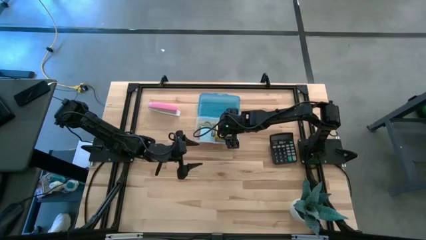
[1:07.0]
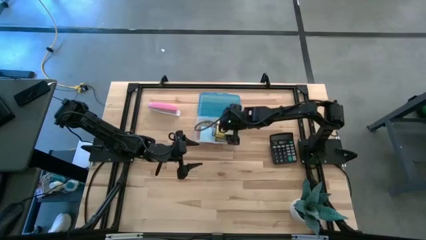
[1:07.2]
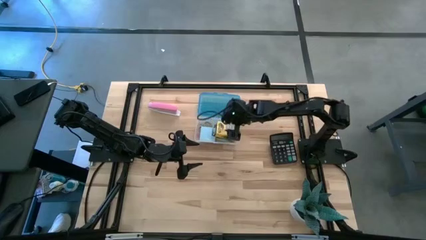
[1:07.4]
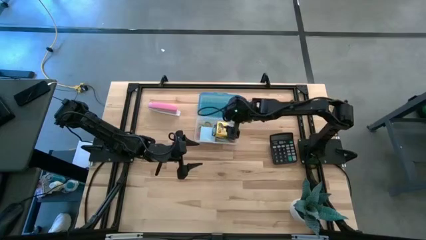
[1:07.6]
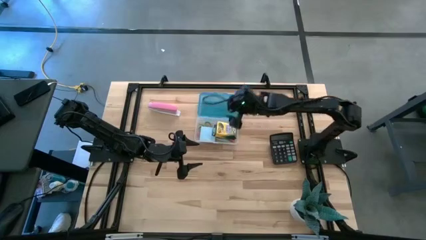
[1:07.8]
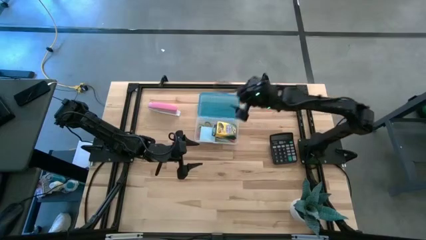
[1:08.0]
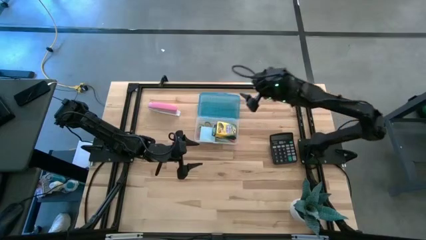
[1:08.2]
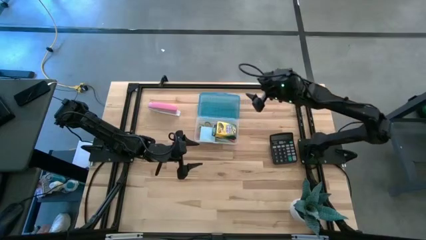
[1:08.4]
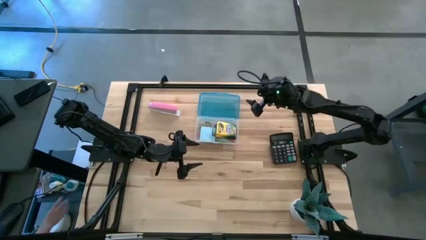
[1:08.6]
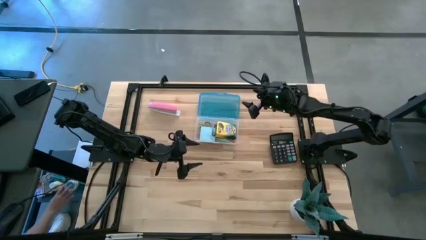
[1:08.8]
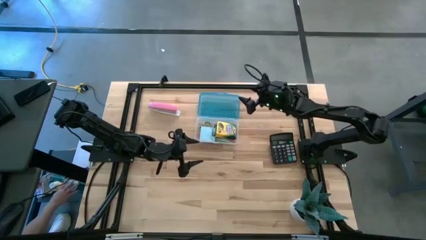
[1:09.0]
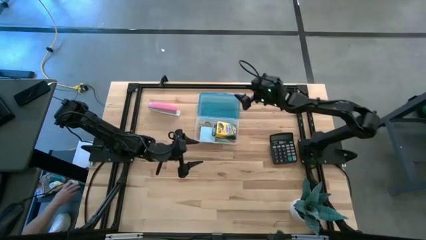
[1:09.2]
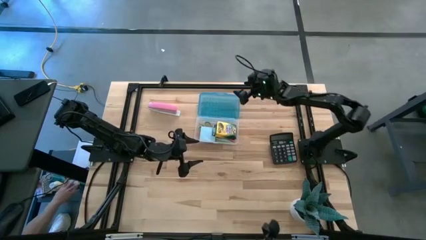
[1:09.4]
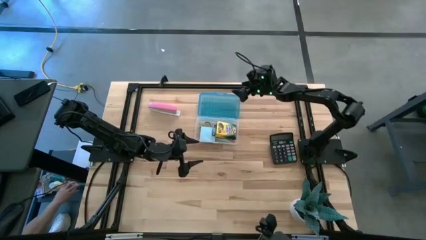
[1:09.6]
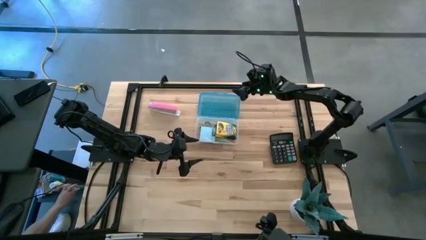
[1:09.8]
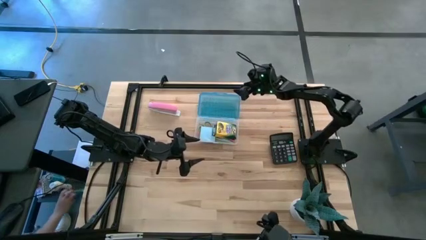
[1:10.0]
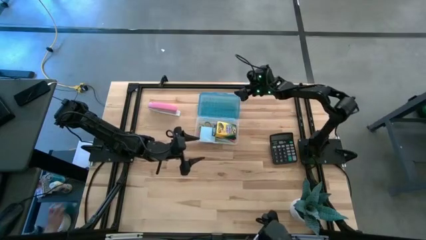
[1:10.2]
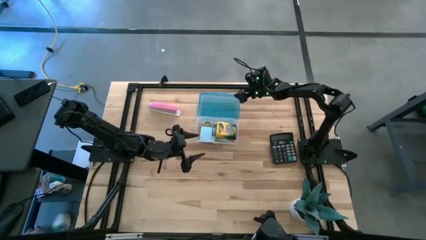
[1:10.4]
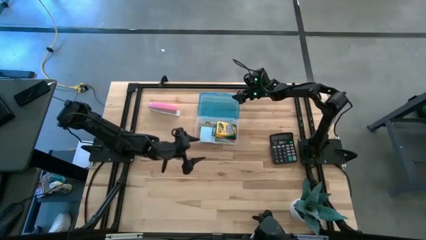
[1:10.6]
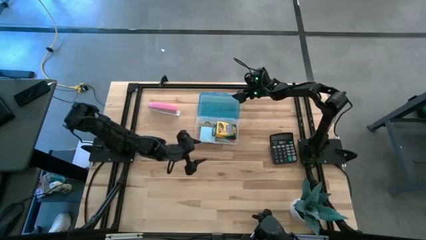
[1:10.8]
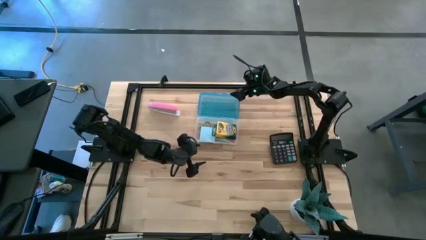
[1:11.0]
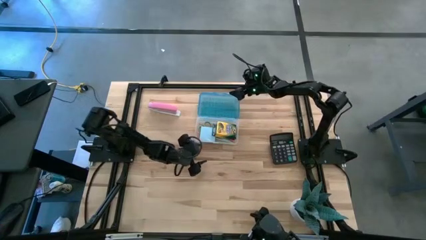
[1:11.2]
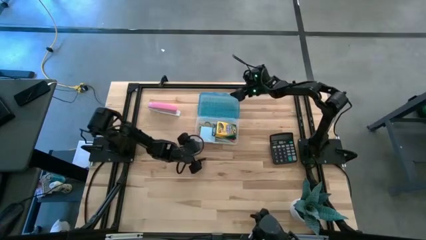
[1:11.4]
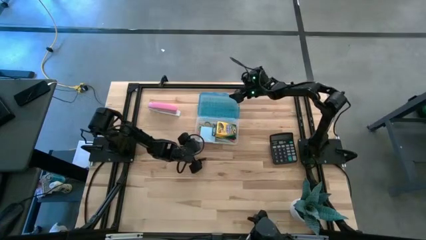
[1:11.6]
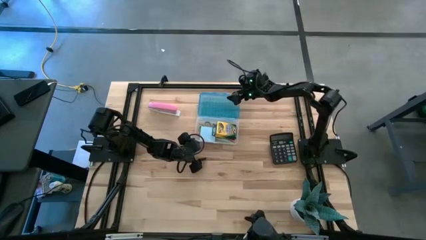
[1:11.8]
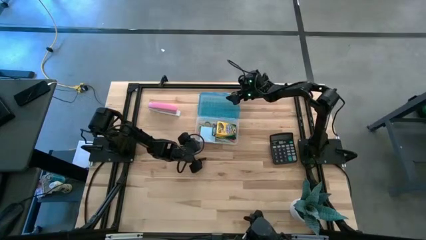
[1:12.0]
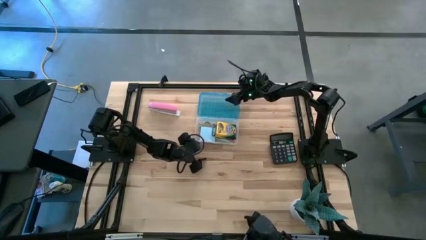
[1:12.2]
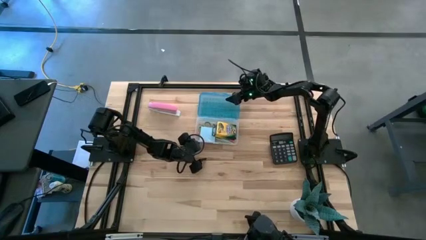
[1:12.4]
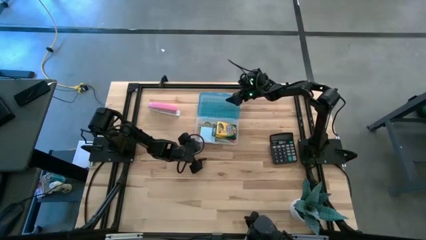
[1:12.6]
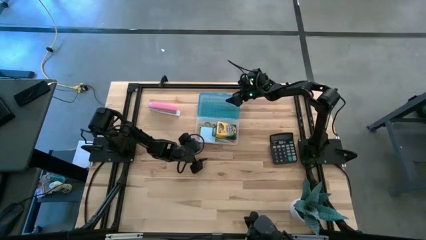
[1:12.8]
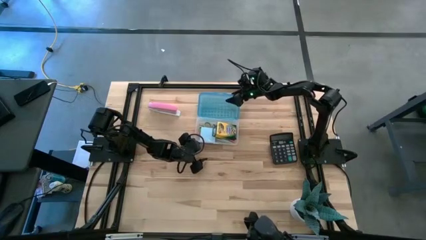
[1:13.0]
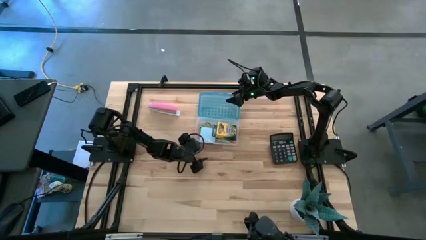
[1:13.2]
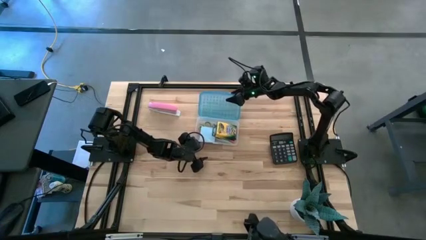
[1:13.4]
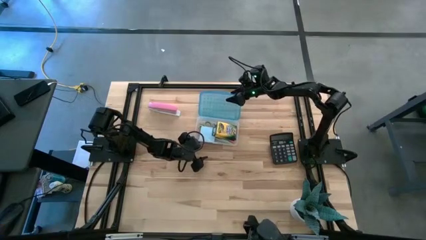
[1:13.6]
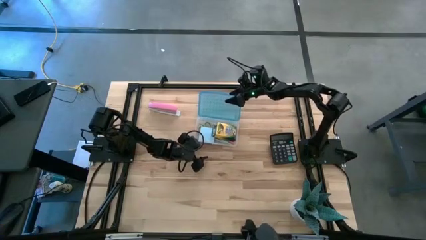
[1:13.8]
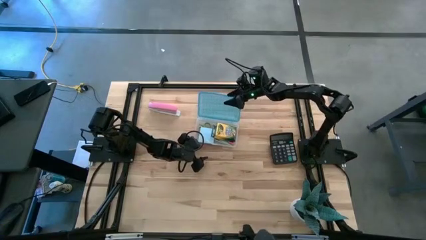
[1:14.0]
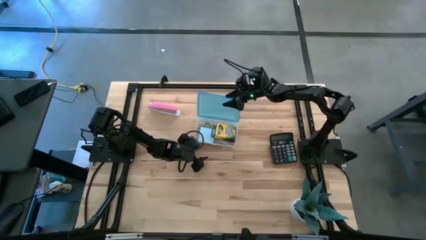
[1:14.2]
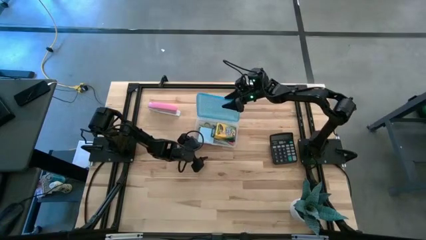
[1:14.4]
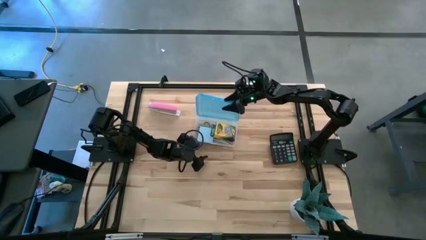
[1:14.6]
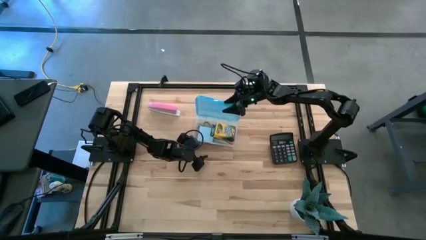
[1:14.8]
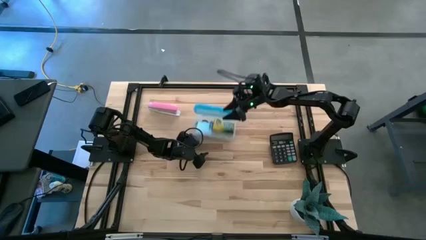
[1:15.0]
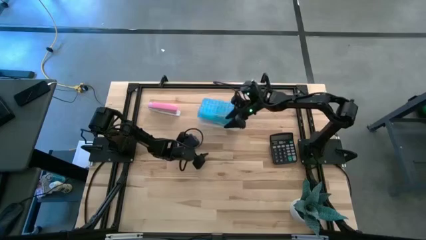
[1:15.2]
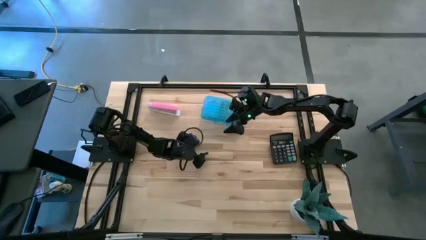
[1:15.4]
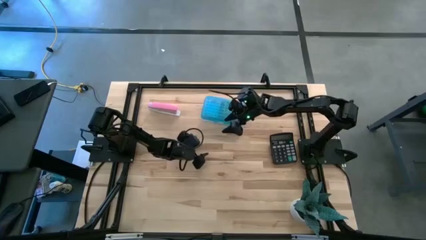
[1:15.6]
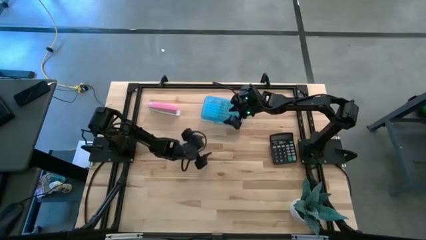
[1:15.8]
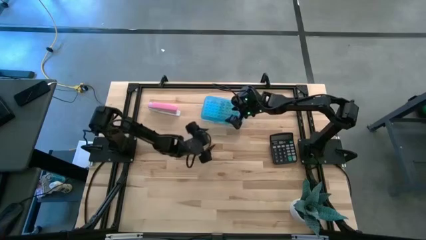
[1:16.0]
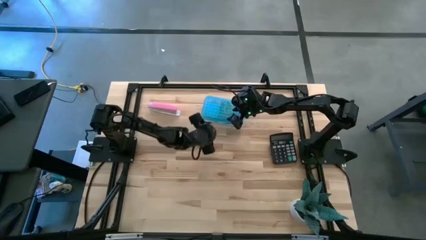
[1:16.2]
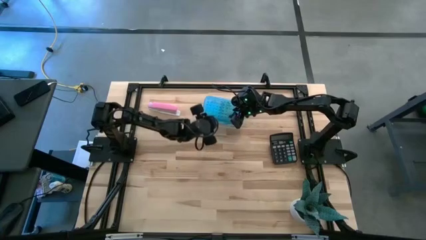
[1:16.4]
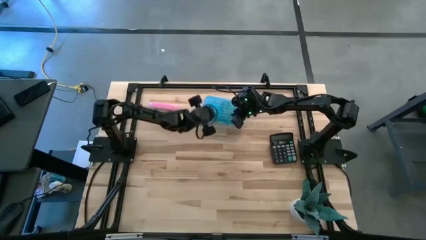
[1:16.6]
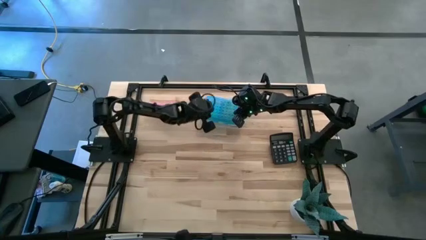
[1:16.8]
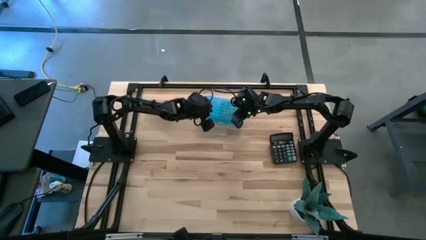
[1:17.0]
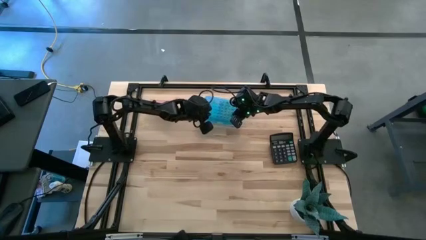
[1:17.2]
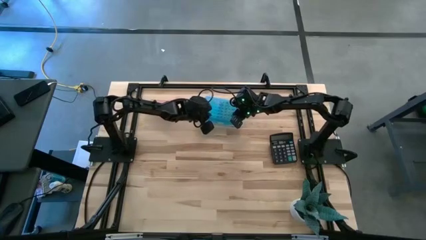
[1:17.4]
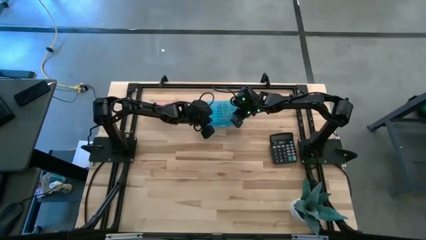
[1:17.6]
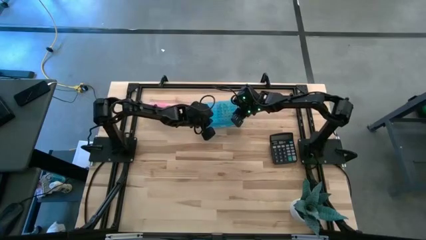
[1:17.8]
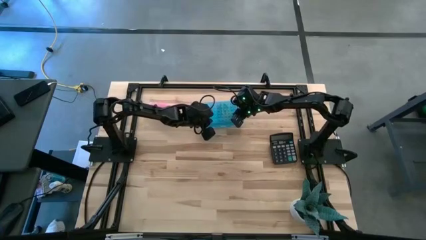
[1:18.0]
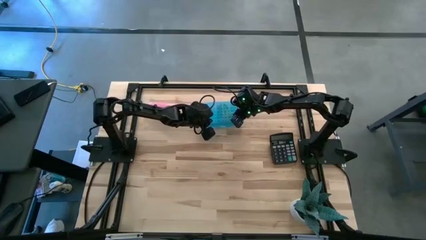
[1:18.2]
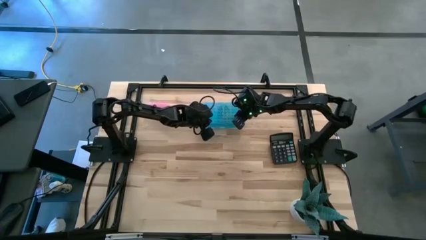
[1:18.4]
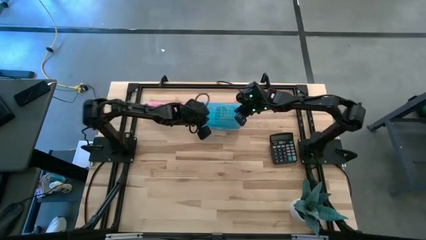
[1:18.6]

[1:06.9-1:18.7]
Task: Pack school essentials
Close the blue supply box

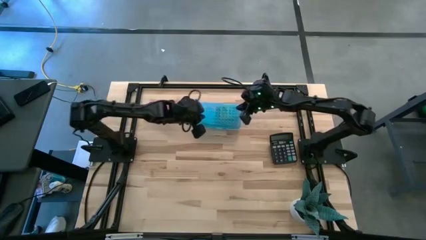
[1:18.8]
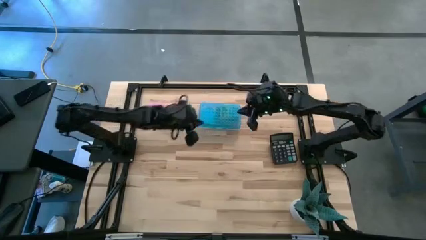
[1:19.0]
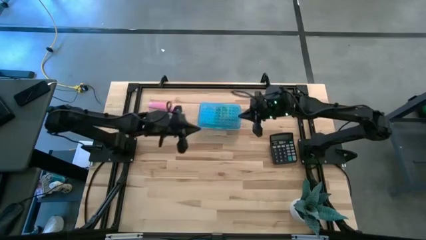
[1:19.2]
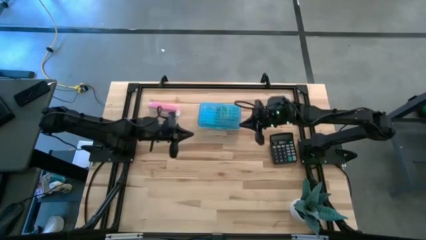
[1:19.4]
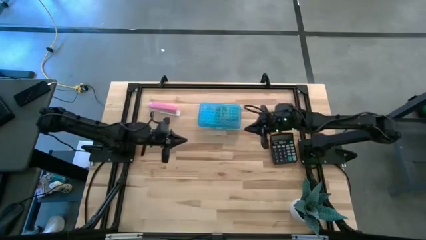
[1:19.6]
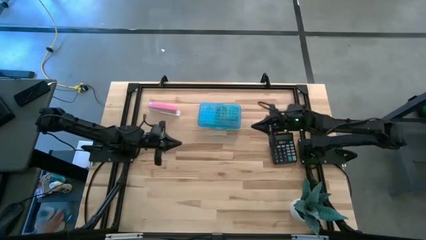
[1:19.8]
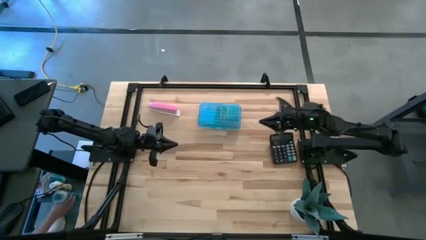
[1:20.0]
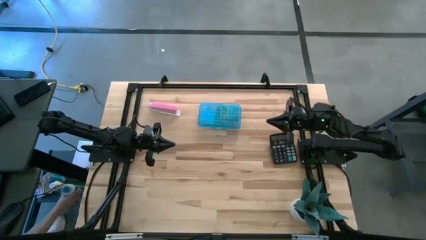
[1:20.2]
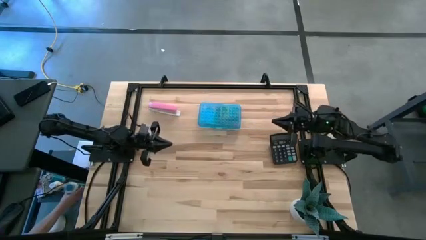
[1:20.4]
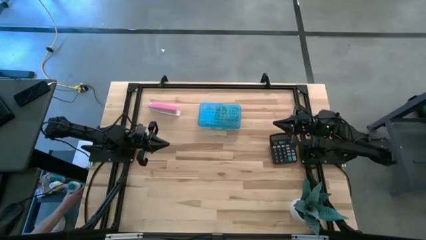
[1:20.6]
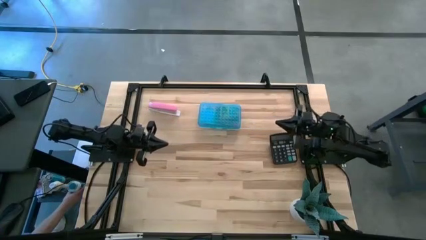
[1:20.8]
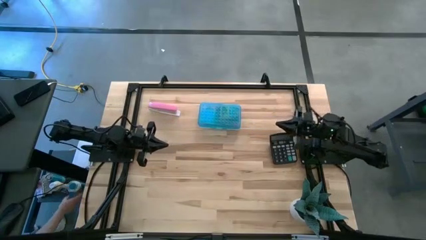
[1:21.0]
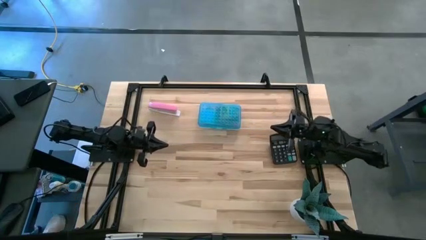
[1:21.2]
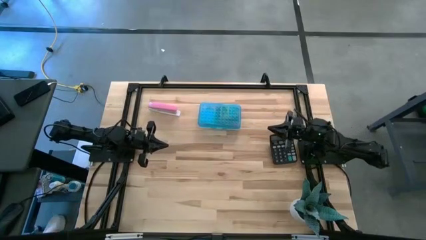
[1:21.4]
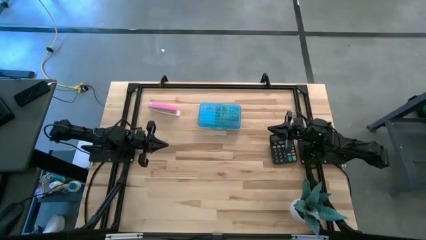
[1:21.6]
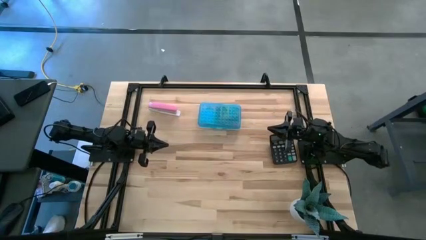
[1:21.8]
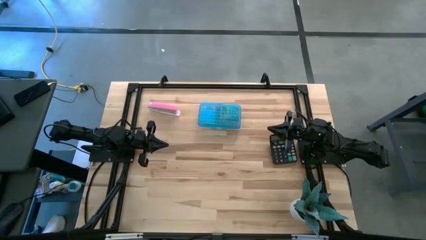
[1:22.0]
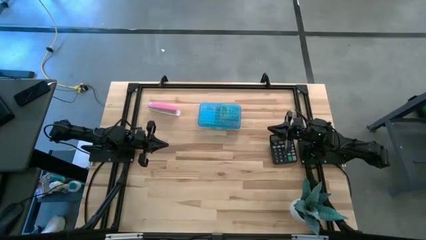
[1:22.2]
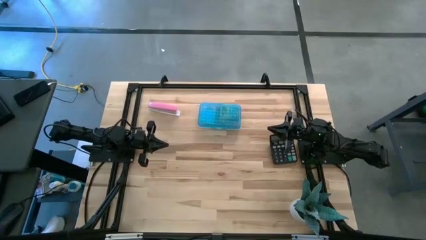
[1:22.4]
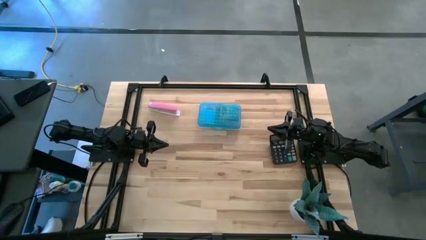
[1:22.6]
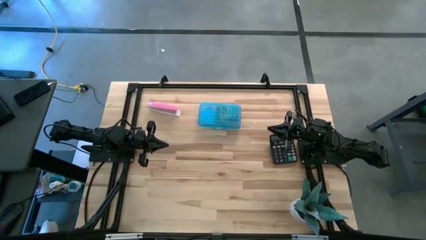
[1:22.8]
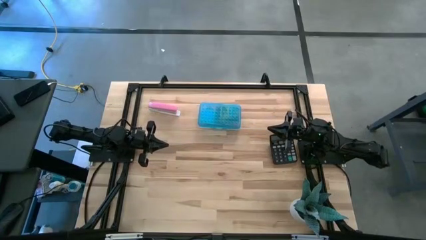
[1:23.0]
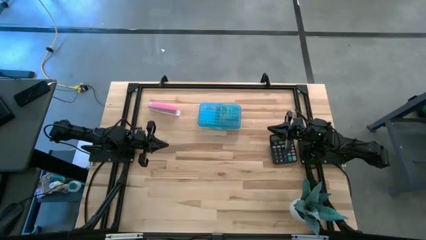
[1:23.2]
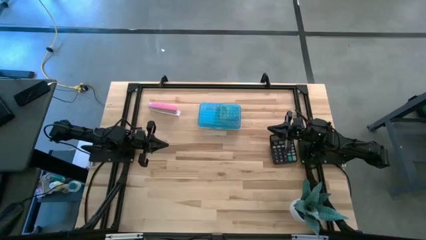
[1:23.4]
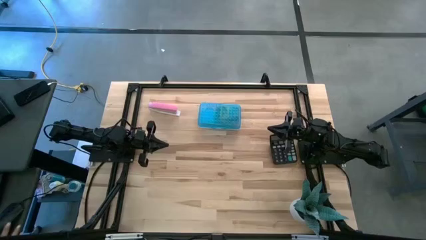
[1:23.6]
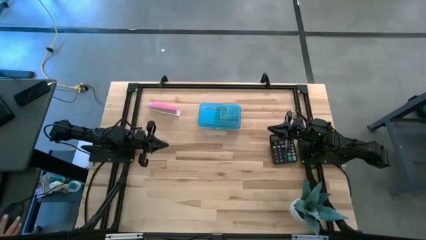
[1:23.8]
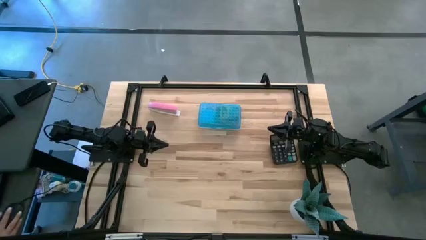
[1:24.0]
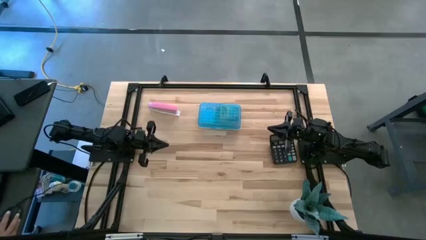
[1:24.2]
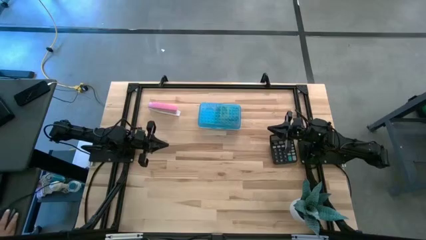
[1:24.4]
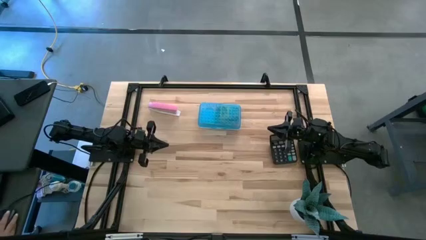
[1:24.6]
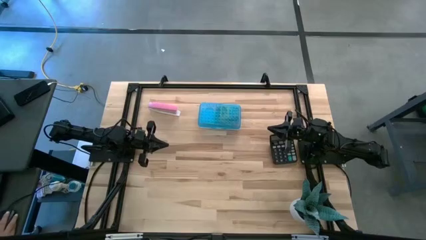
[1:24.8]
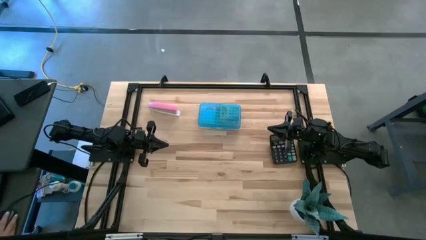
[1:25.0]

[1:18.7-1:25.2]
Return to Home Position
